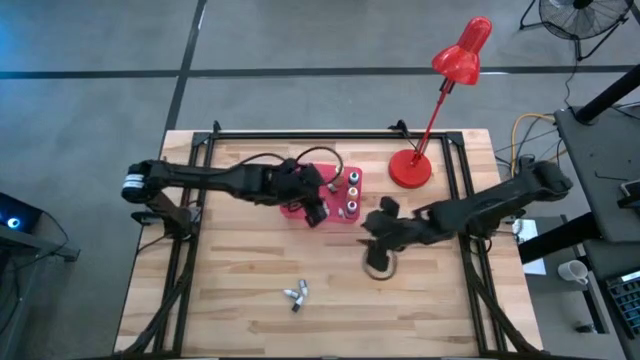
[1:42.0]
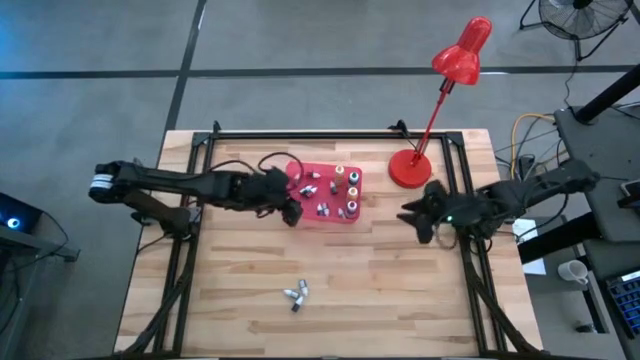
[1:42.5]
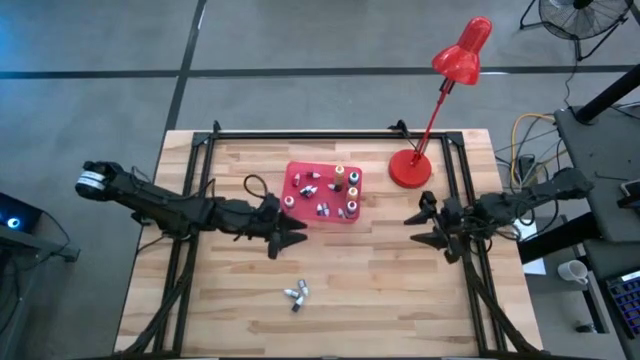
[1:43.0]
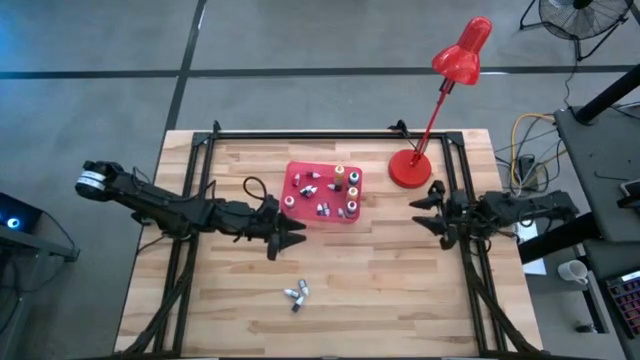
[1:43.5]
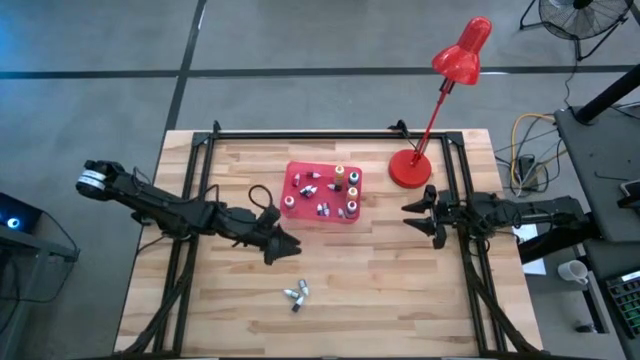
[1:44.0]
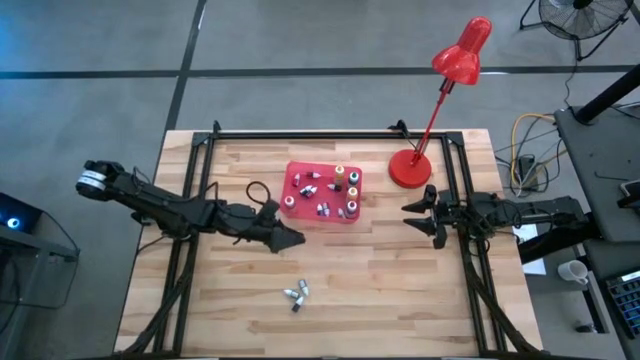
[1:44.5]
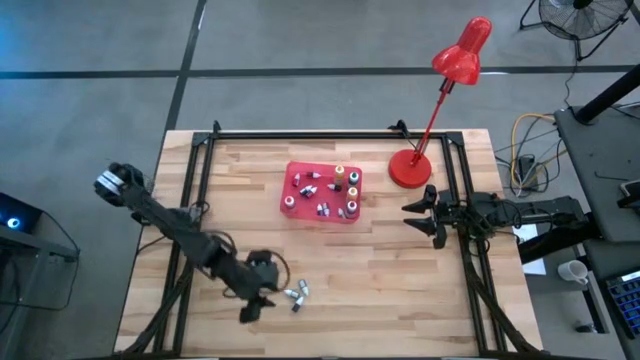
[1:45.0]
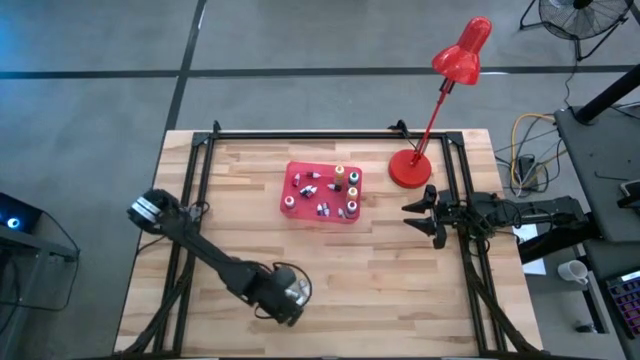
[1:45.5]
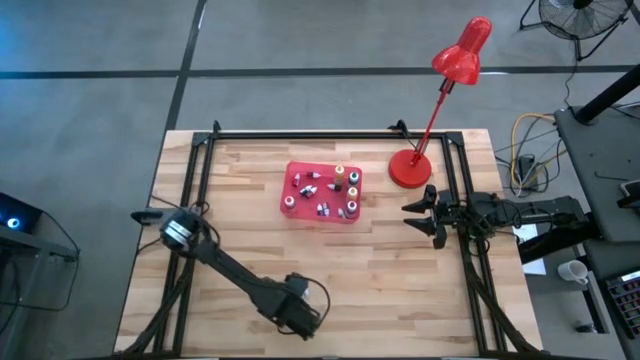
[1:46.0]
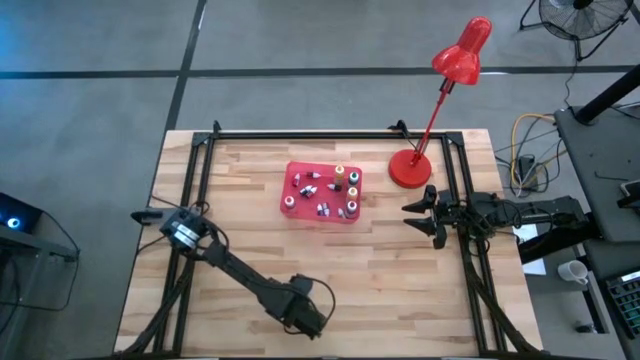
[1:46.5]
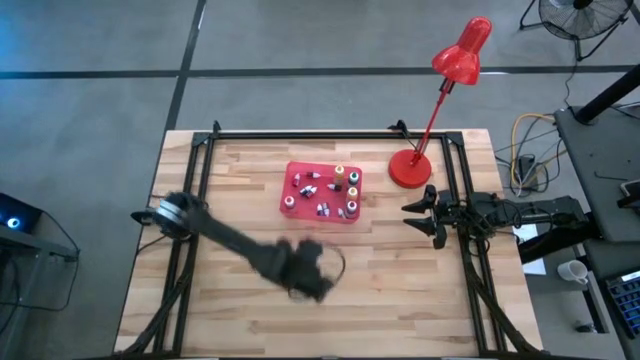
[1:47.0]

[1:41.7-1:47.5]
Task: Pick & Place food coloring
Put the small black food coloring bottle into the pink bin

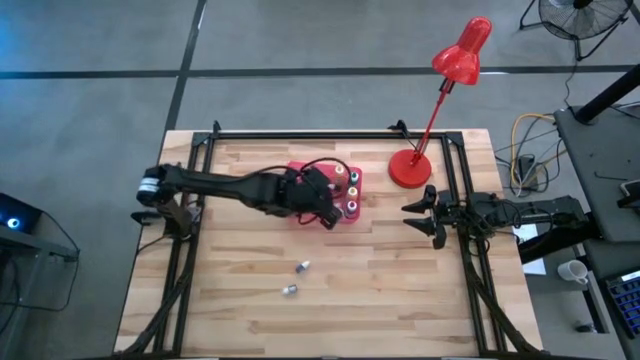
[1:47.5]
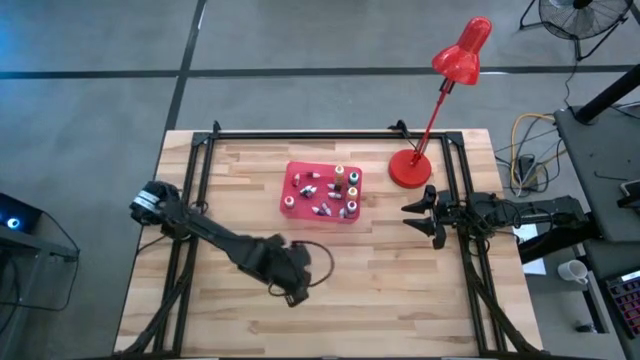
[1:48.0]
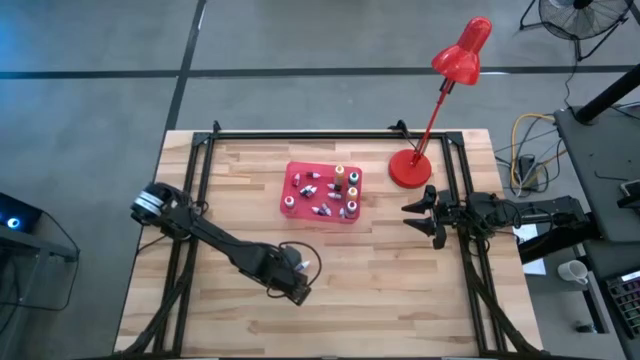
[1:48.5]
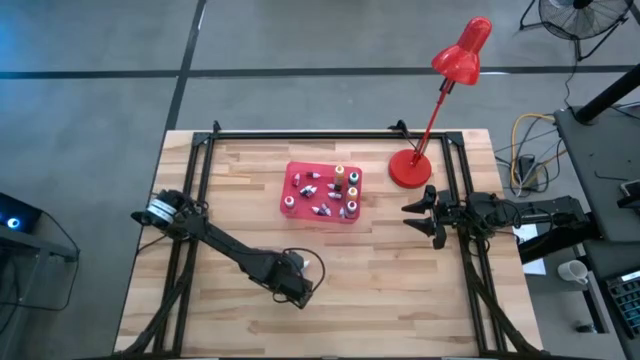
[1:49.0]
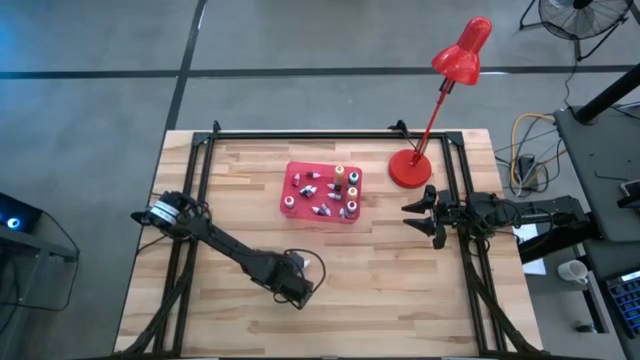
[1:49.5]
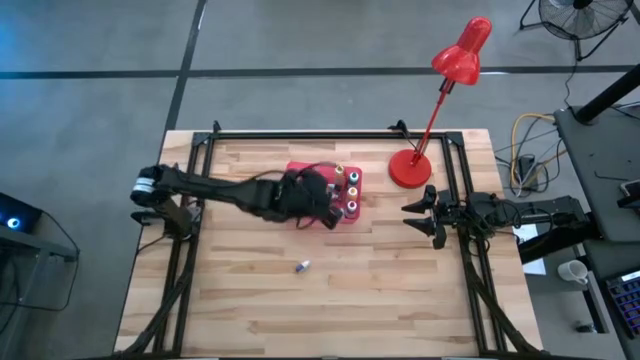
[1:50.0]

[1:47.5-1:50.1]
Put the small green food coloring bottle into the pink bin

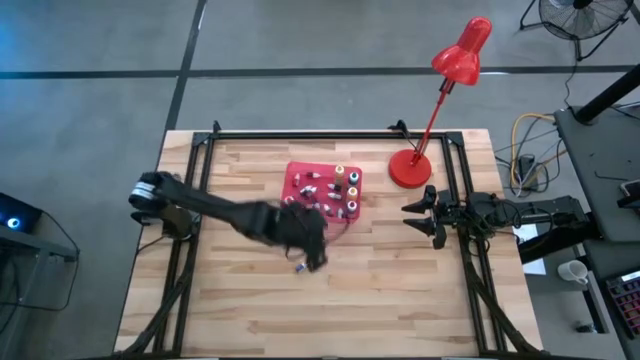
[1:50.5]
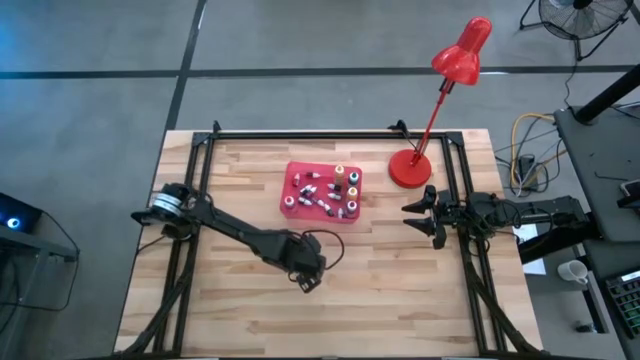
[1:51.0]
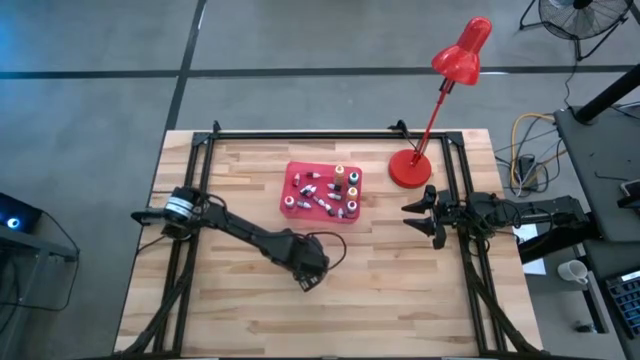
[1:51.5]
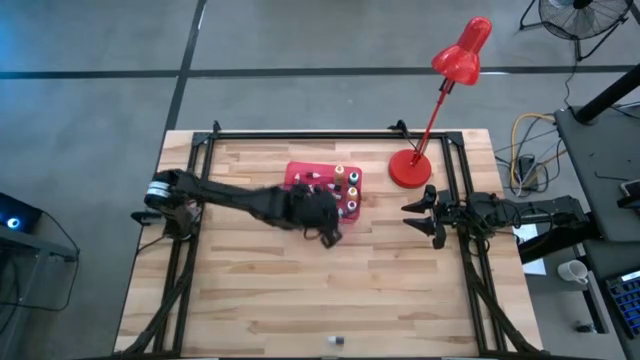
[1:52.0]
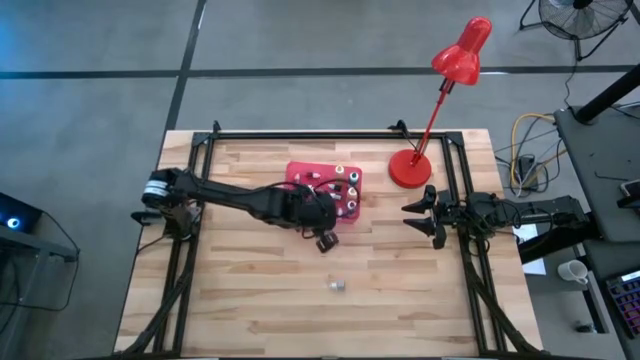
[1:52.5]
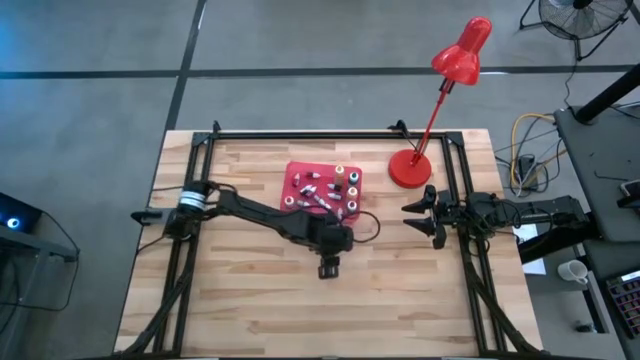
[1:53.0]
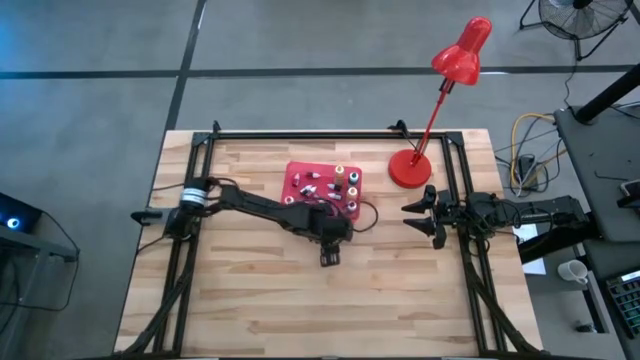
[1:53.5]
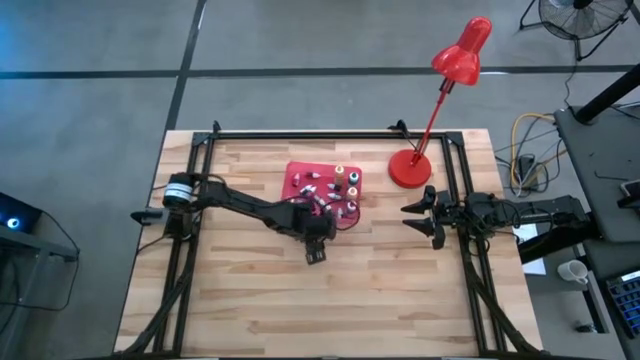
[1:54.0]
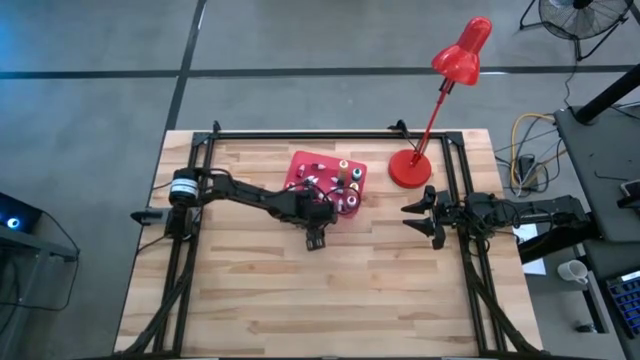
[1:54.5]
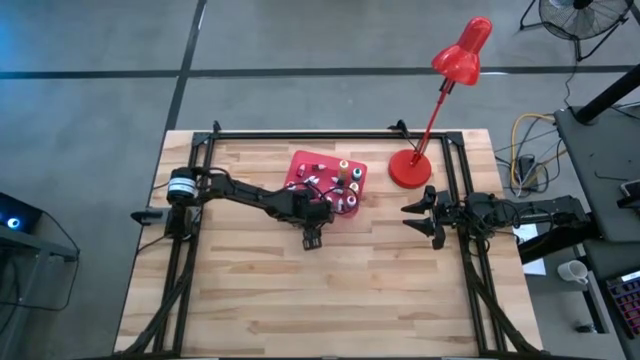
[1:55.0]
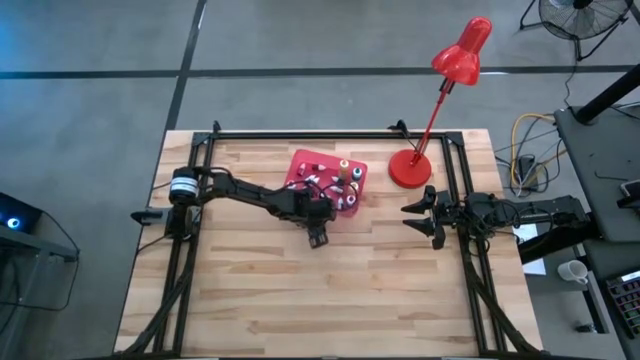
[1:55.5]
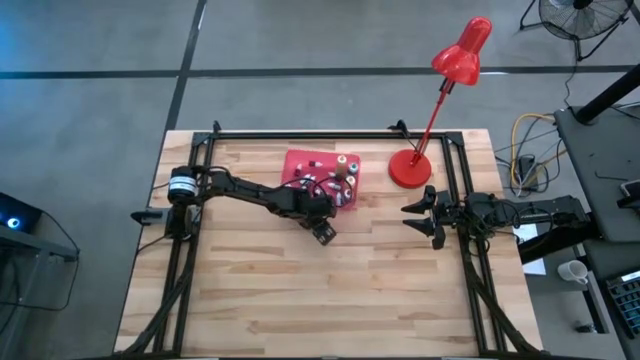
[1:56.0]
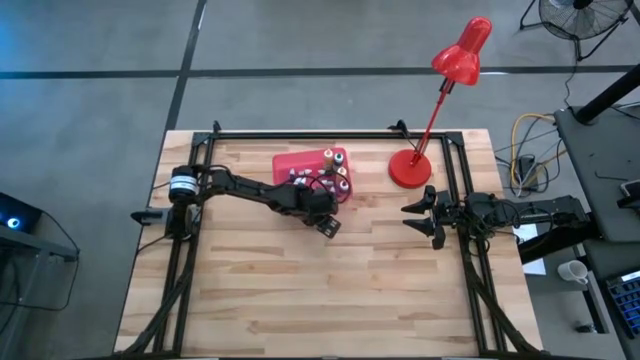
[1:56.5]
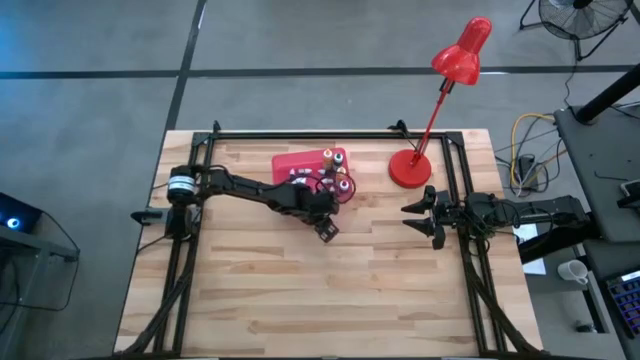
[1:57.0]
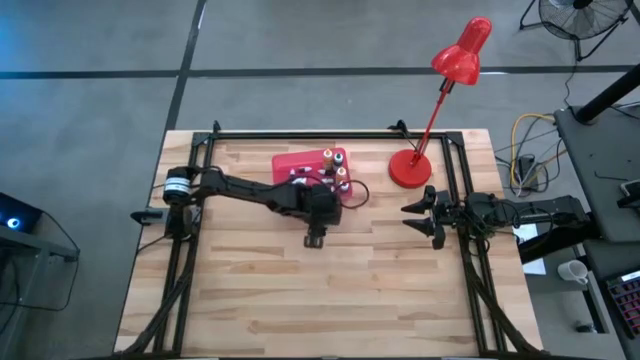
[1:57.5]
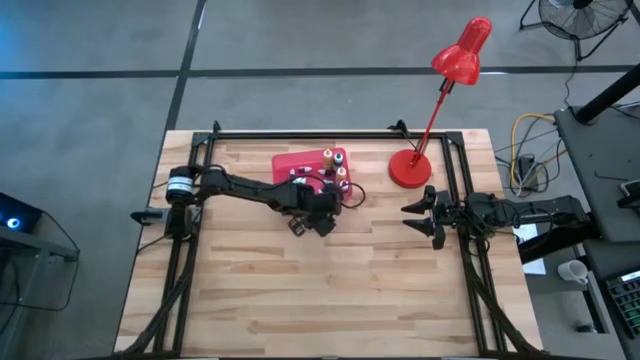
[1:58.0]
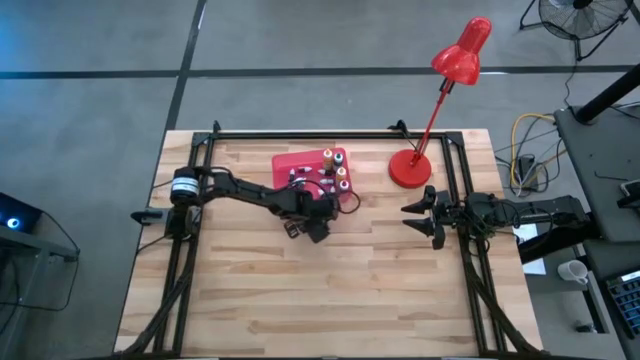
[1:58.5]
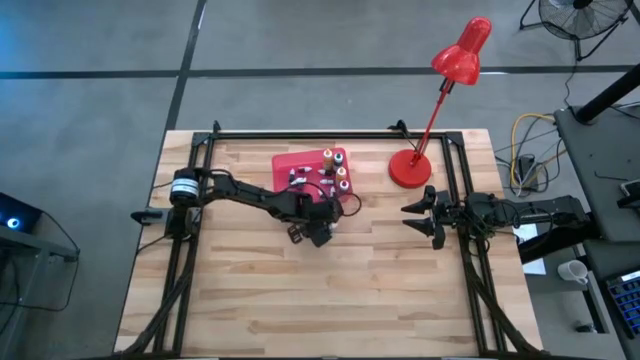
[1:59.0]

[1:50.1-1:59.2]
Put the small dark blue food coloring bottle into the pink bin

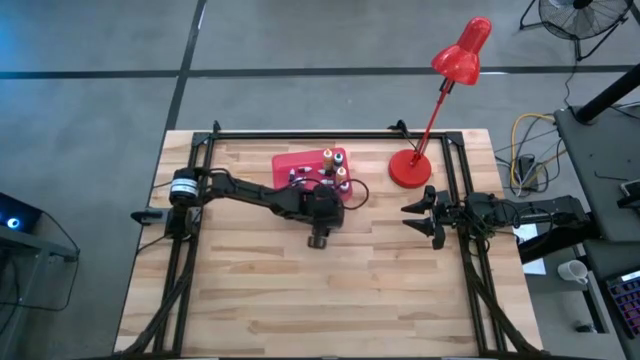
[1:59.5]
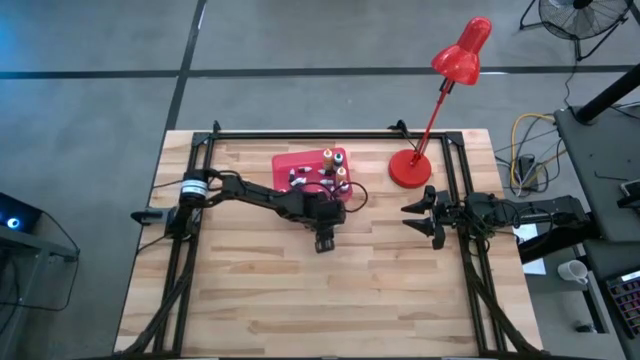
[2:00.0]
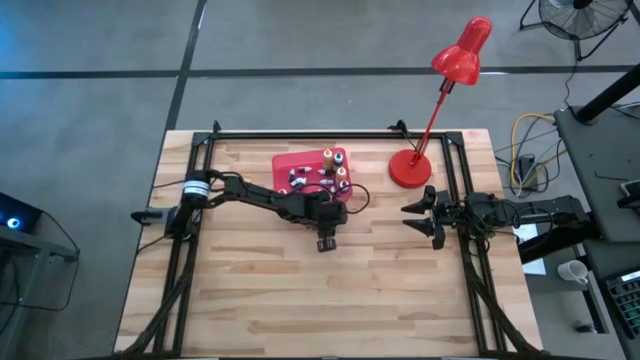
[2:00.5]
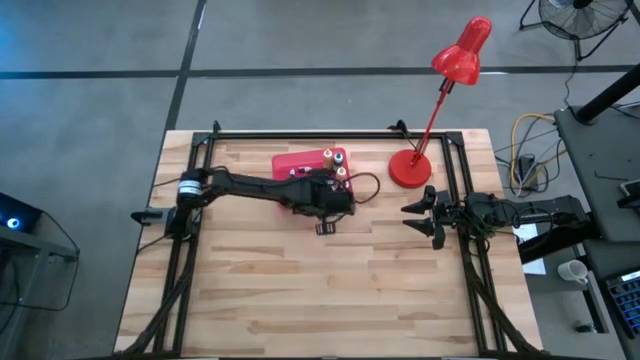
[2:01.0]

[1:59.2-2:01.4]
Put the small dark blue food coloring bottle into the pink bin
